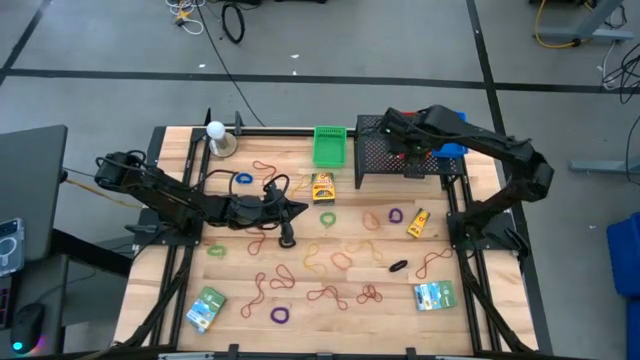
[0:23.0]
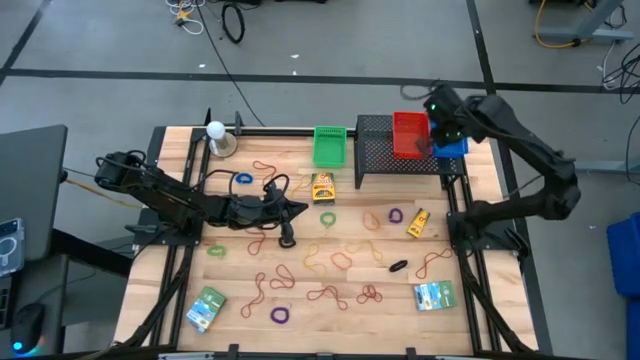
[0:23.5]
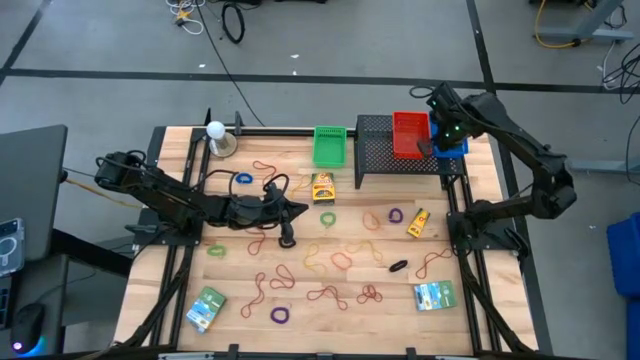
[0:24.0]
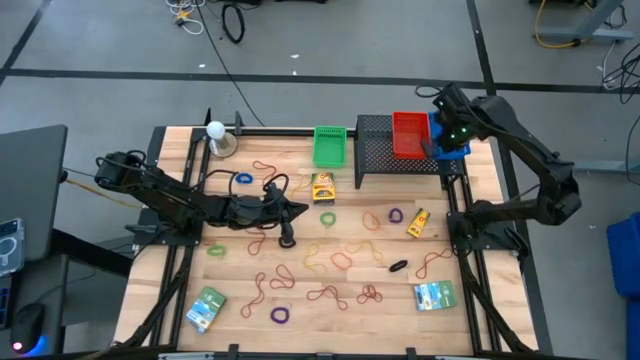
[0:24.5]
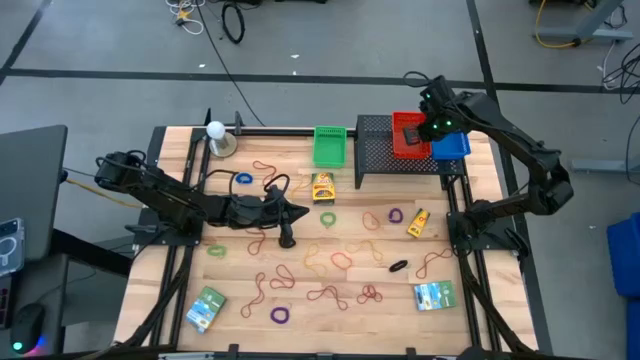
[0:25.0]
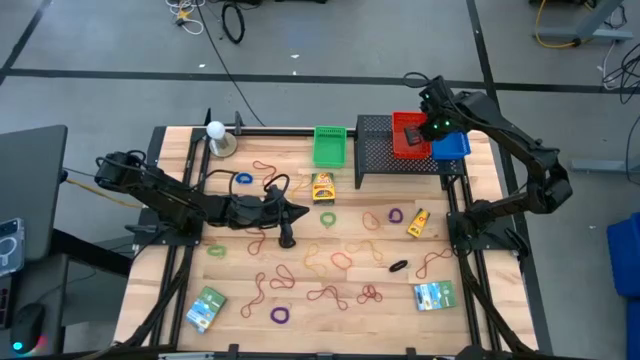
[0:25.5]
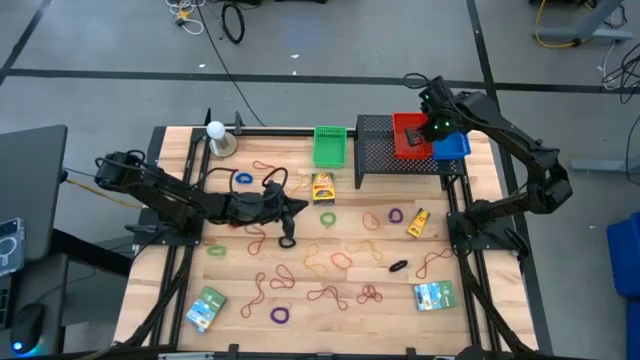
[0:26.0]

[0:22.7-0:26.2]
Task: Pick & Place Office Desk Supplies
Adjust the bins on the shelf

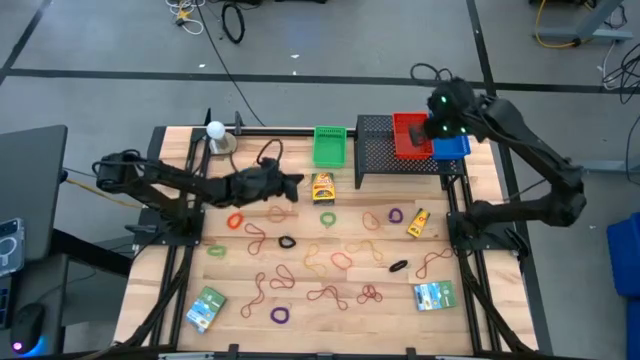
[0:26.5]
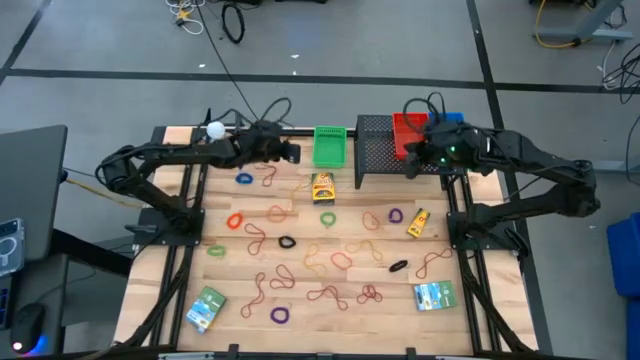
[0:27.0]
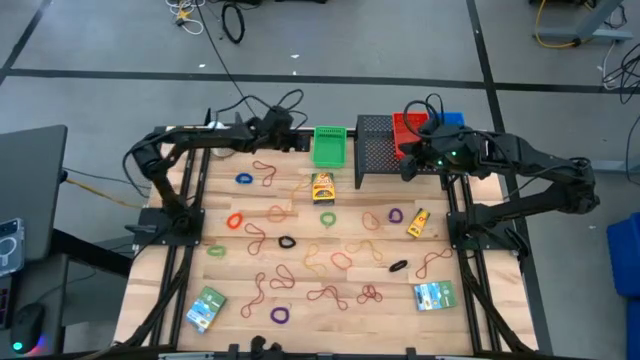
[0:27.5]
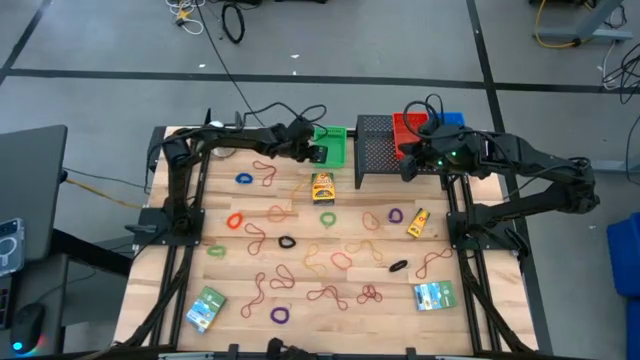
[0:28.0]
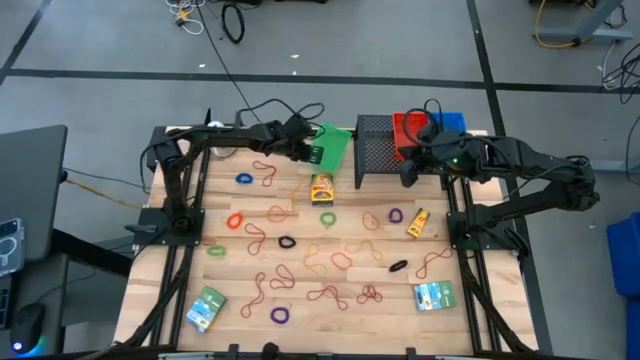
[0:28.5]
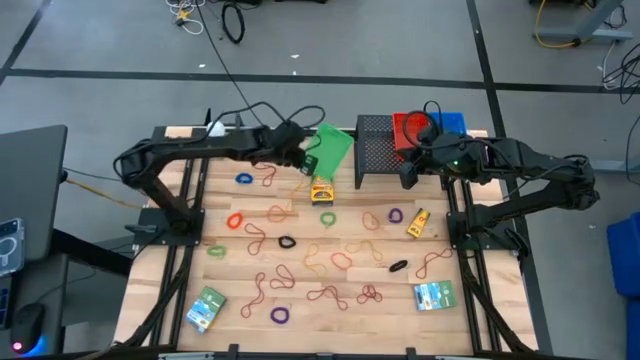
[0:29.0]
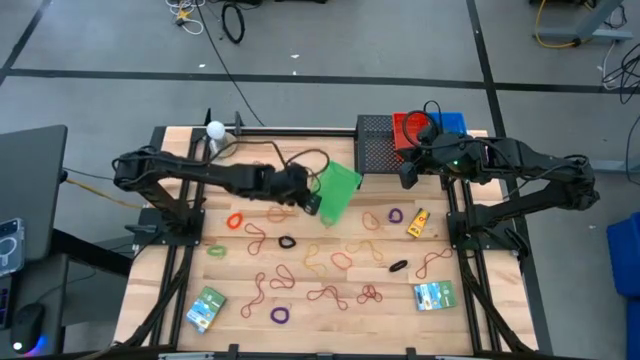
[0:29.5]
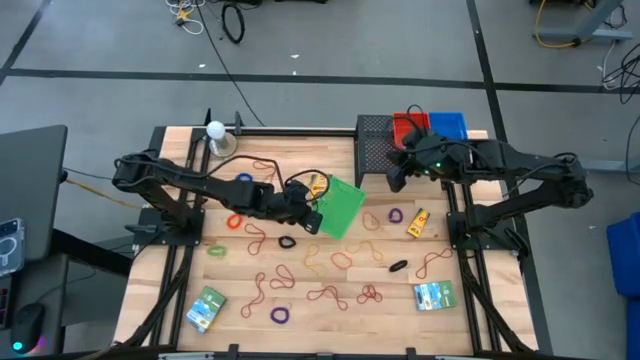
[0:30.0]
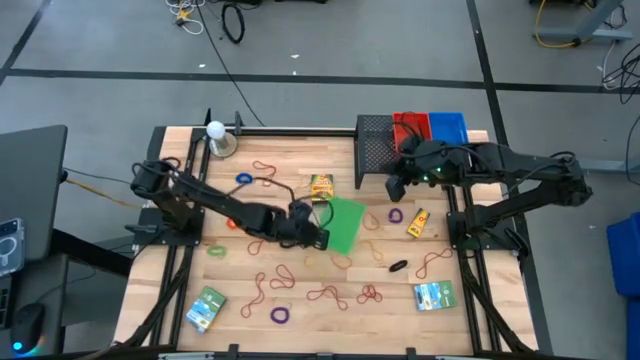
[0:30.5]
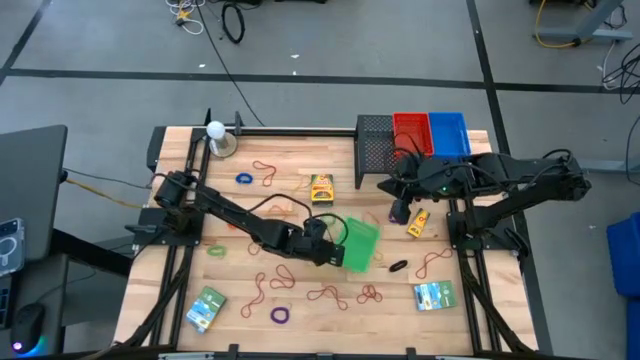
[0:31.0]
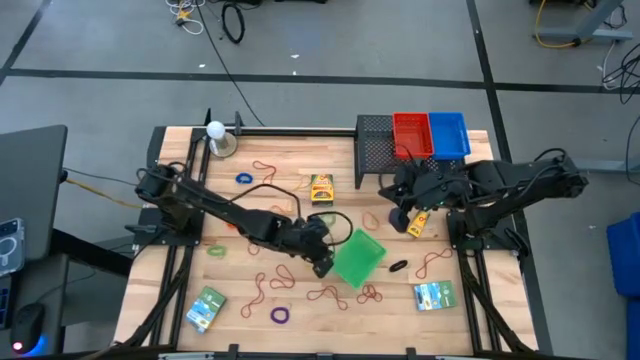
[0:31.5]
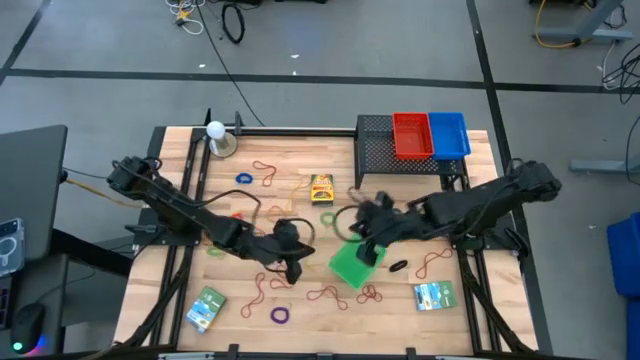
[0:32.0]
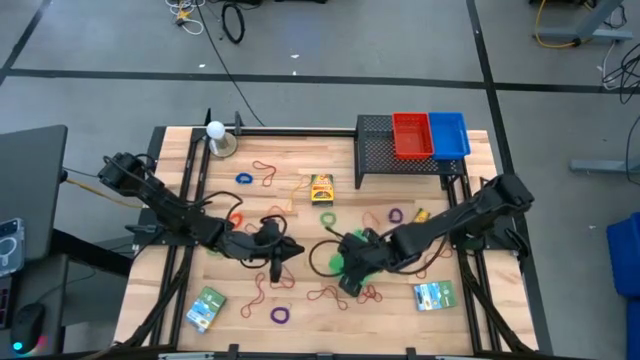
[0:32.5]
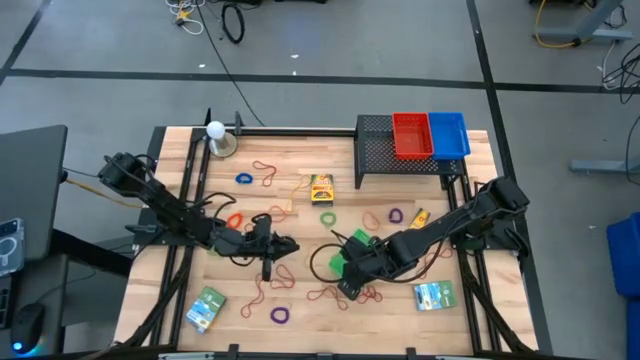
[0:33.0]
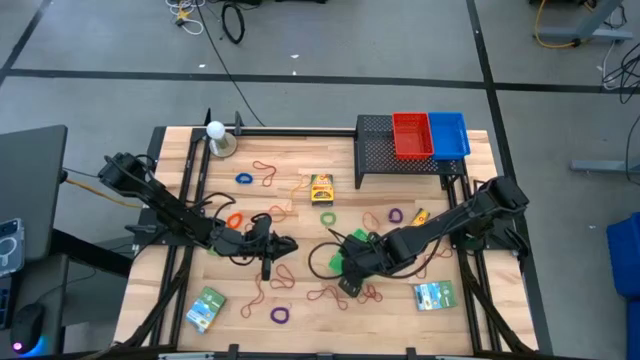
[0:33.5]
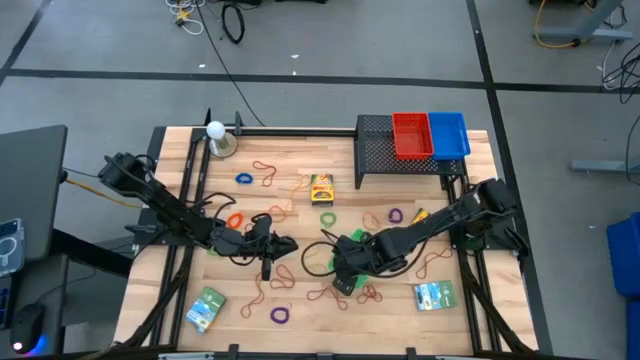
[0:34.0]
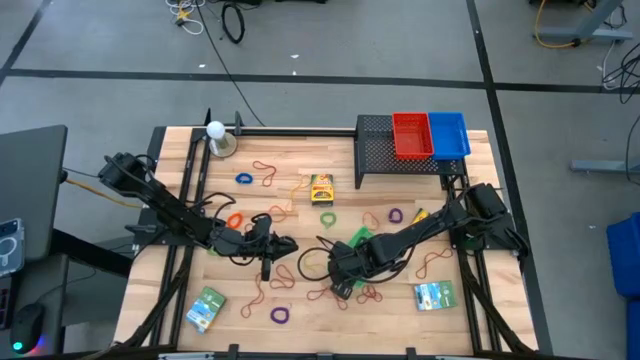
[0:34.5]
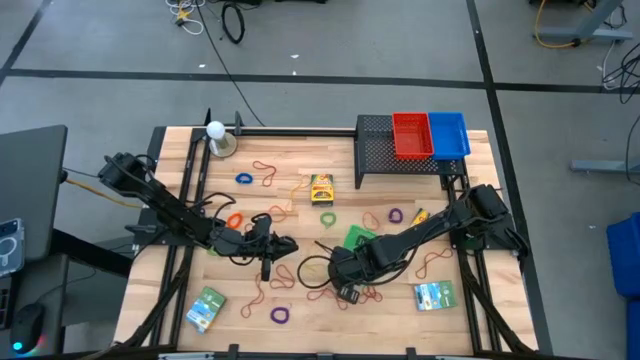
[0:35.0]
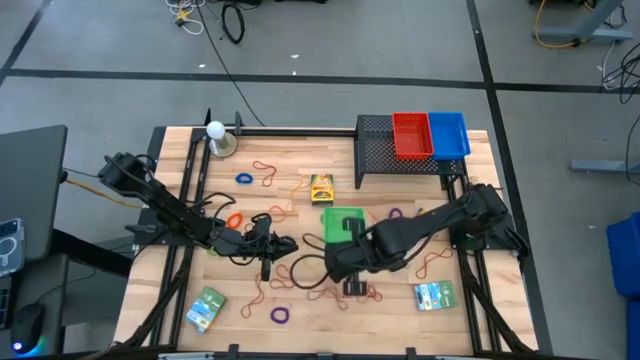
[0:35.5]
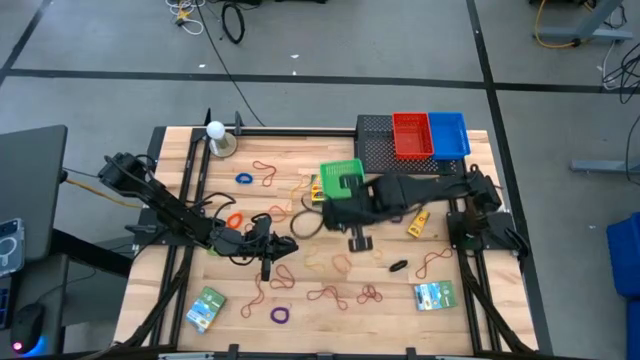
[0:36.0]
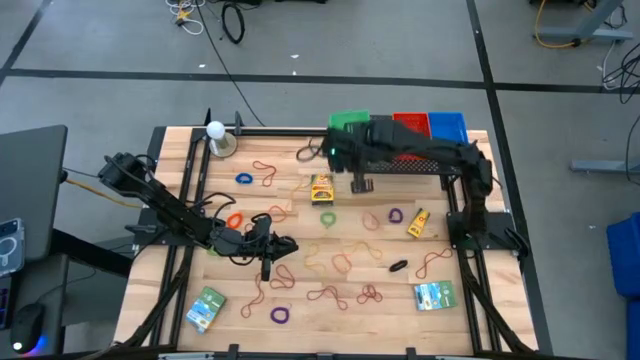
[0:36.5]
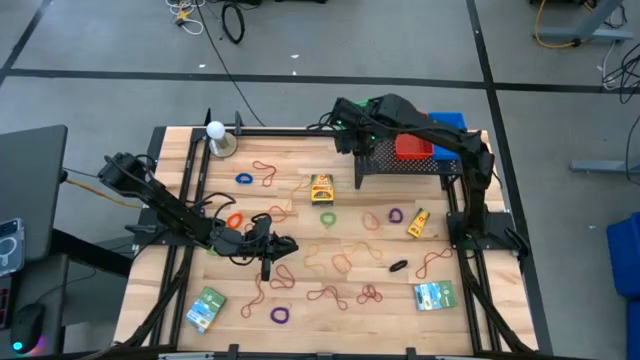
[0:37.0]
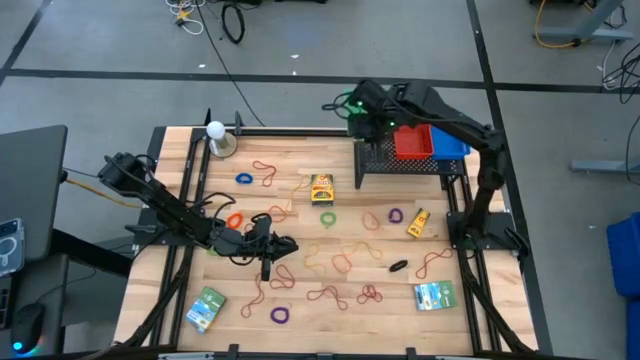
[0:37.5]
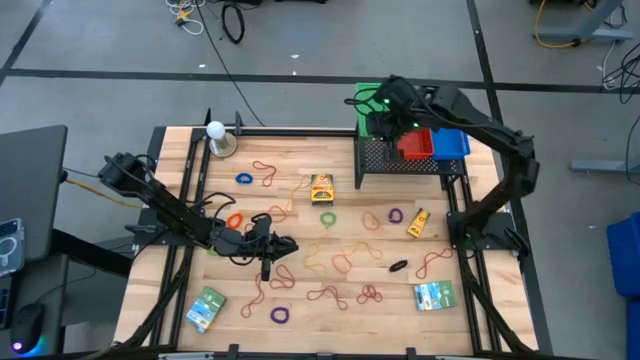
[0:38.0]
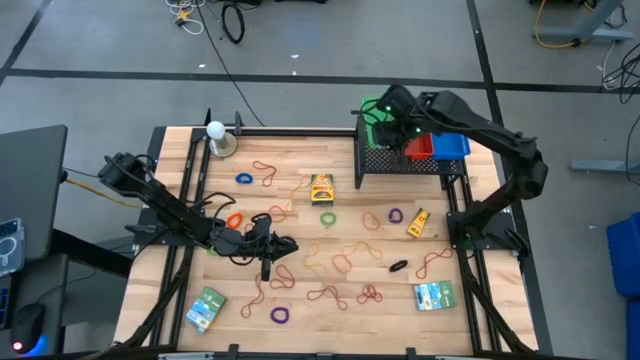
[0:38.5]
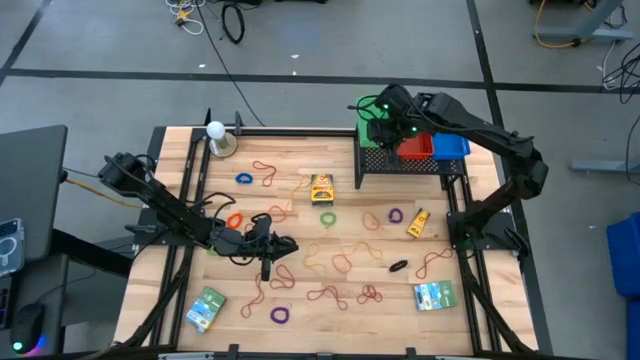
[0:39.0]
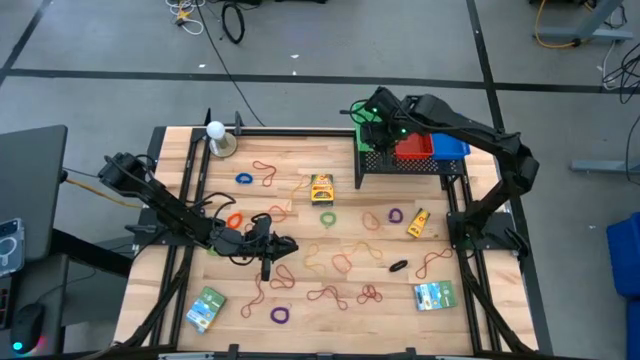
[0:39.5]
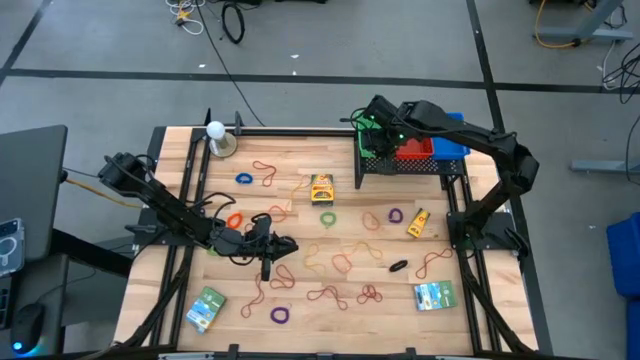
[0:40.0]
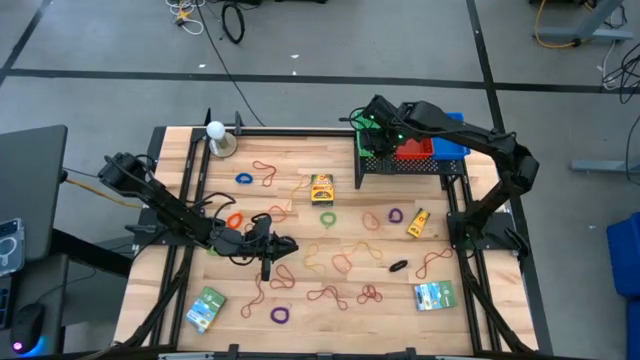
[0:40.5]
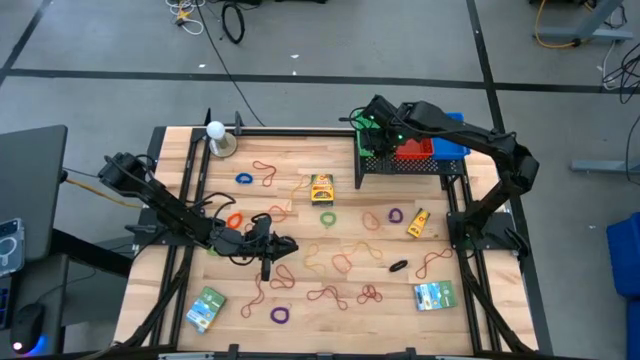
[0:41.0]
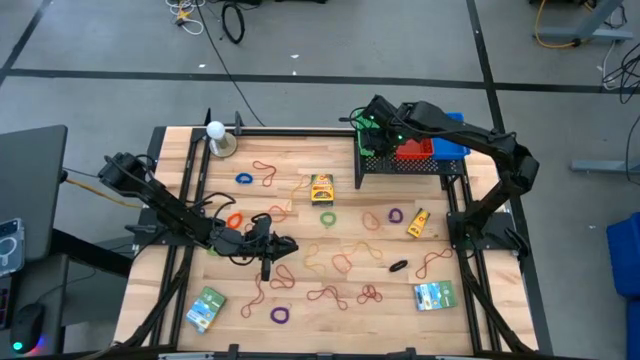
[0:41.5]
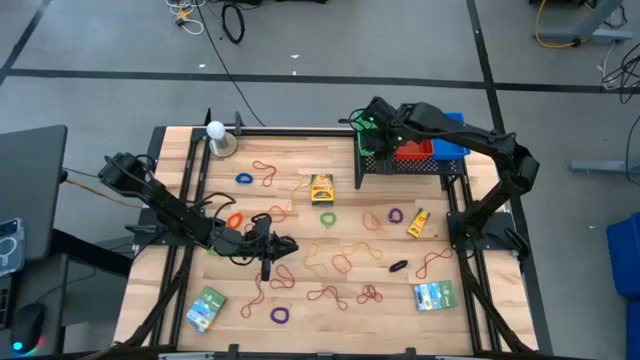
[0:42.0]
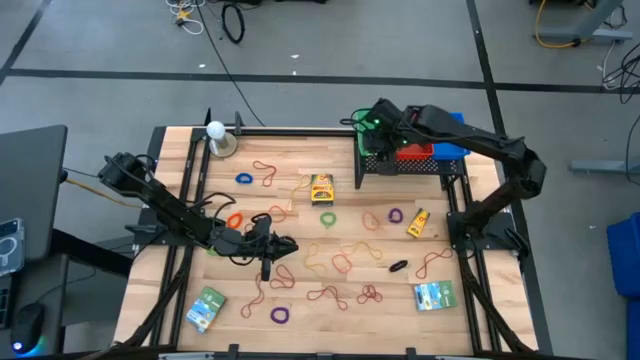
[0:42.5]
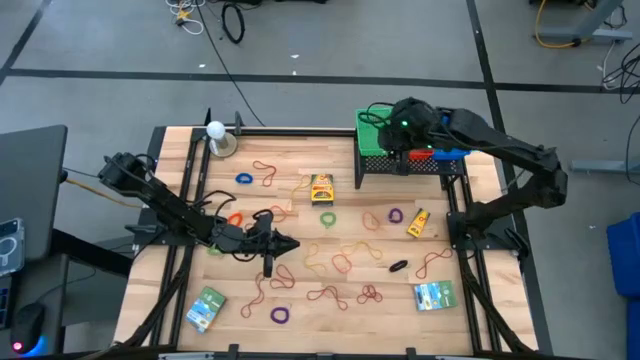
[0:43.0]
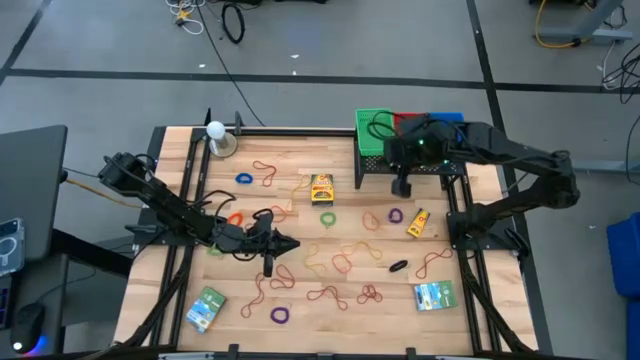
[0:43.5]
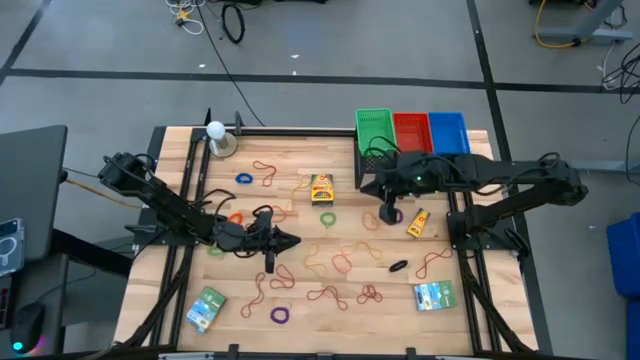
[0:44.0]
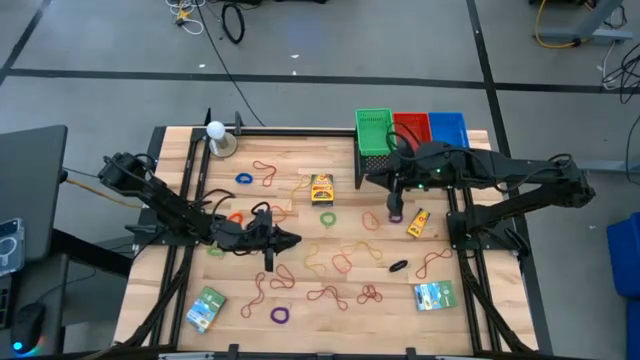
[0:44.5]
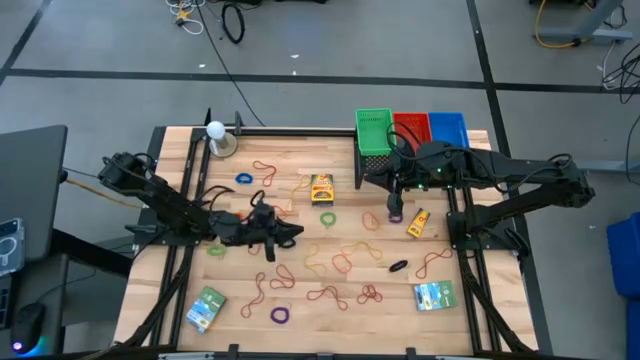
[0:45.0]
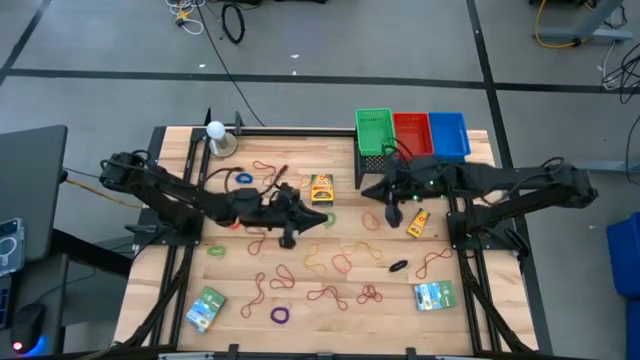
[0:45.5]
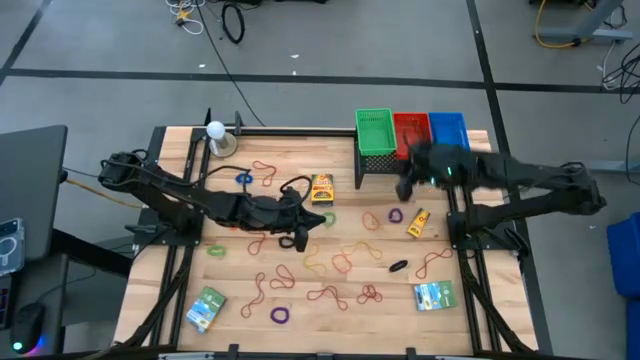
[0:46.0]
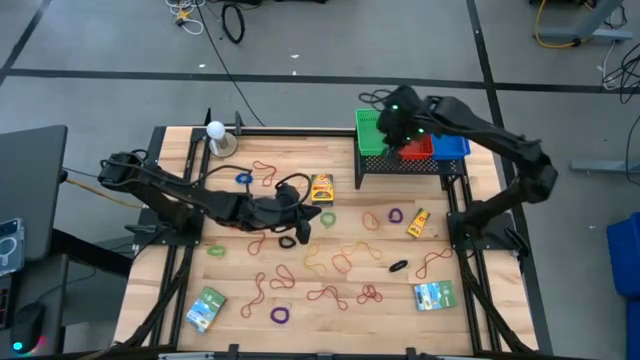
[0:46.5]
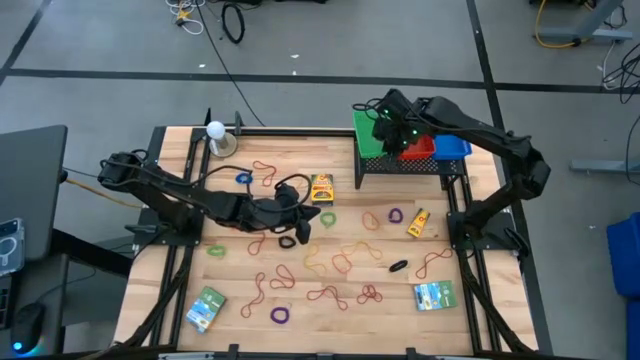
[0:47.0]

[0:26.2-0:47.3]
Put the green bin on the shelf
